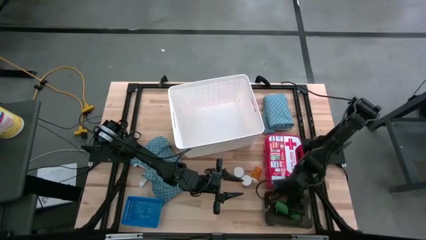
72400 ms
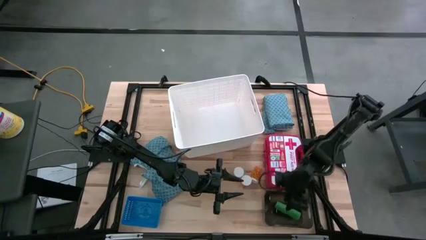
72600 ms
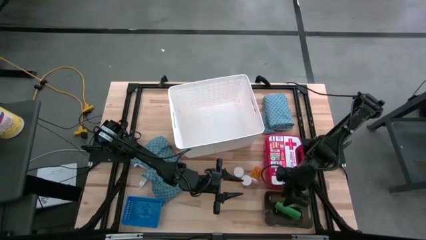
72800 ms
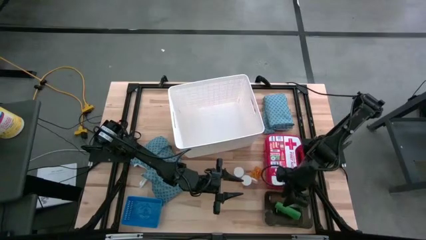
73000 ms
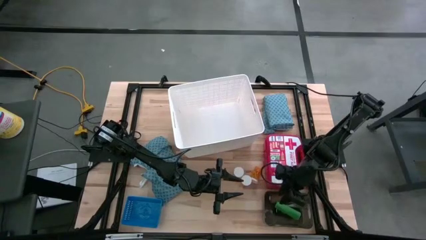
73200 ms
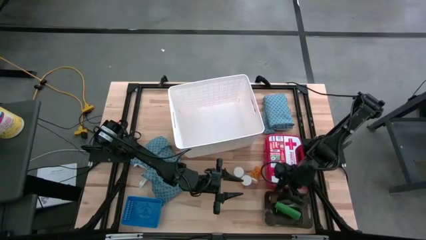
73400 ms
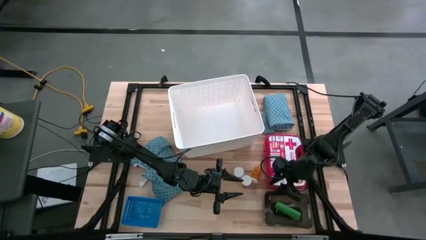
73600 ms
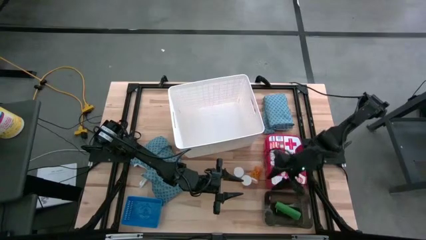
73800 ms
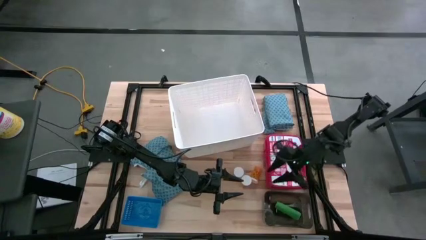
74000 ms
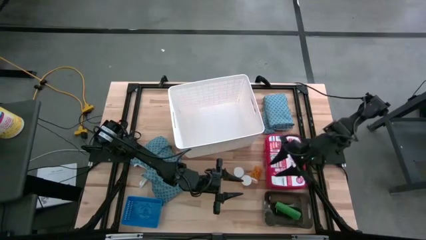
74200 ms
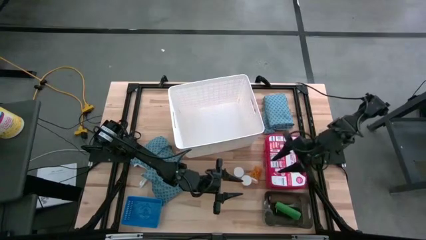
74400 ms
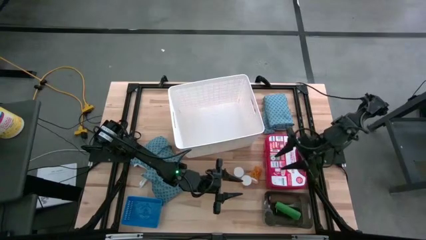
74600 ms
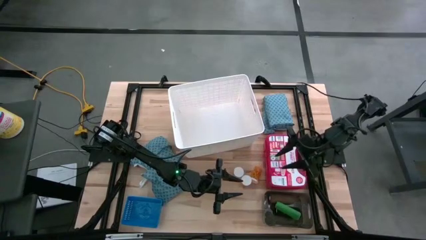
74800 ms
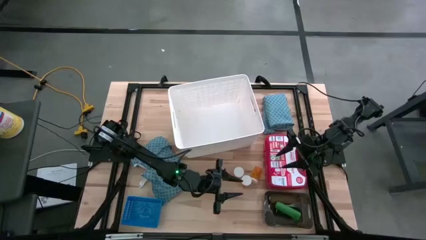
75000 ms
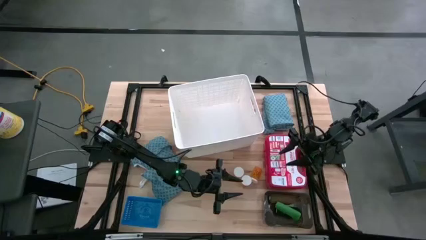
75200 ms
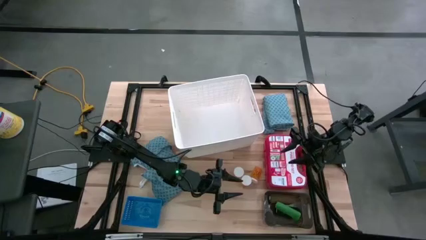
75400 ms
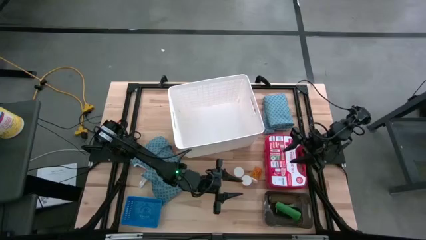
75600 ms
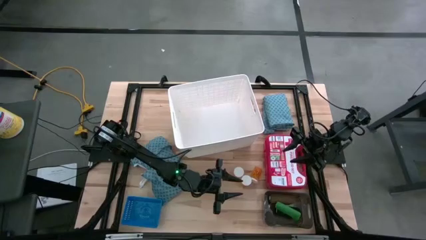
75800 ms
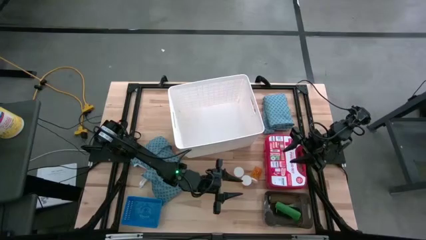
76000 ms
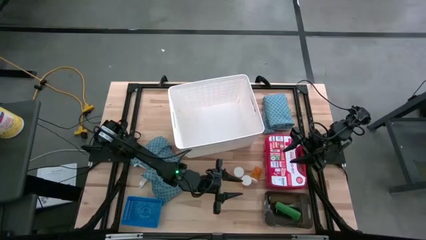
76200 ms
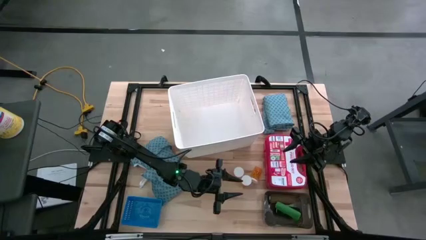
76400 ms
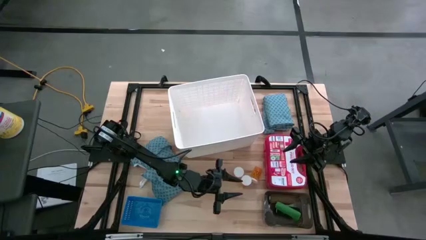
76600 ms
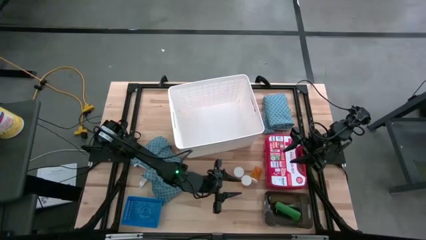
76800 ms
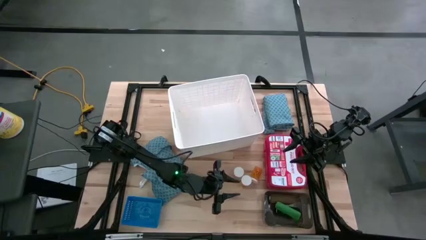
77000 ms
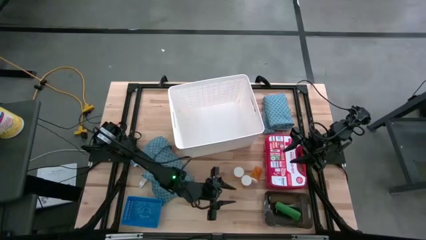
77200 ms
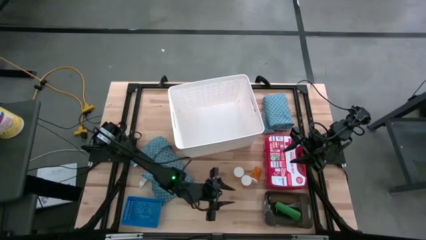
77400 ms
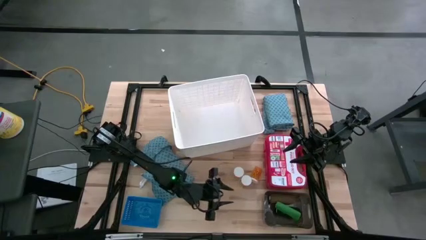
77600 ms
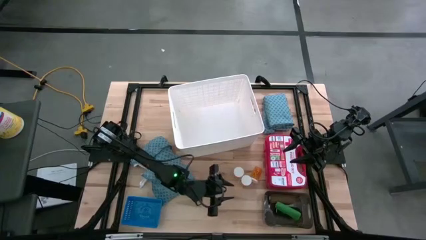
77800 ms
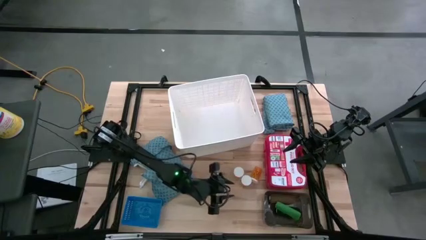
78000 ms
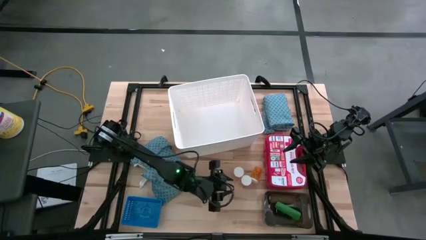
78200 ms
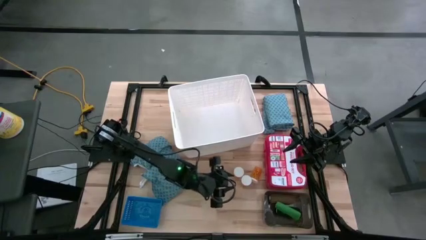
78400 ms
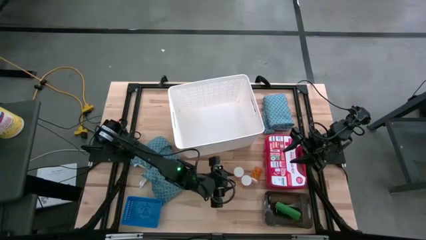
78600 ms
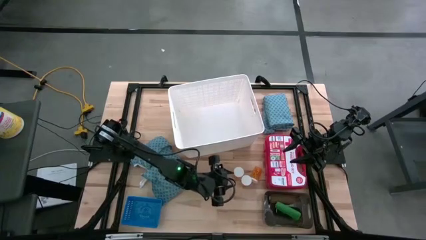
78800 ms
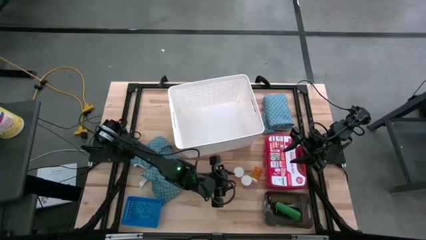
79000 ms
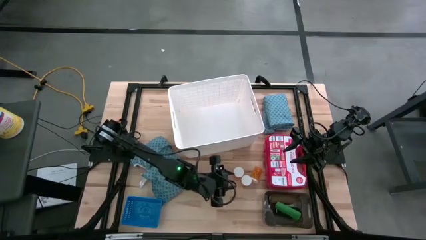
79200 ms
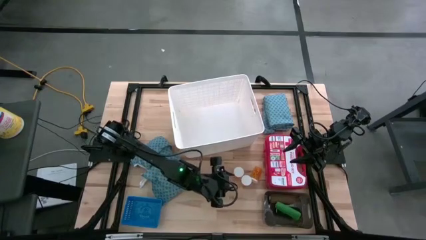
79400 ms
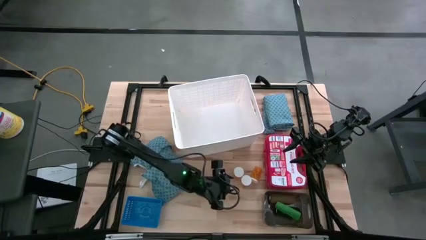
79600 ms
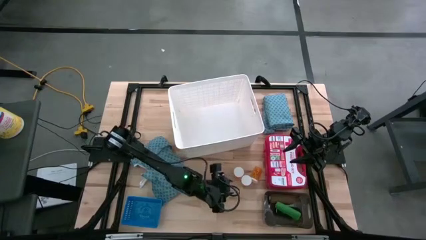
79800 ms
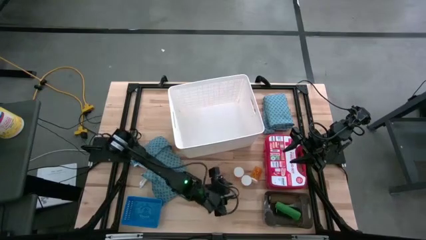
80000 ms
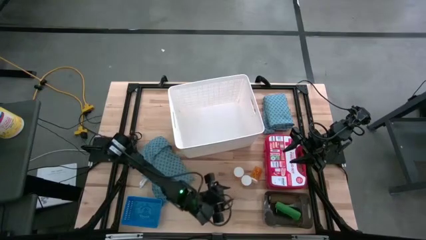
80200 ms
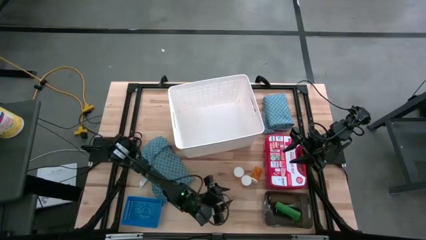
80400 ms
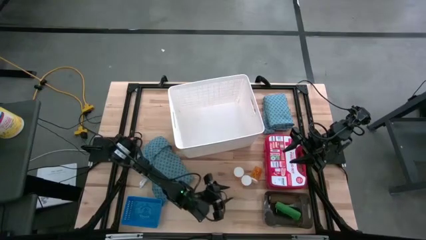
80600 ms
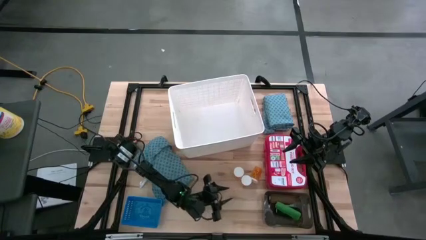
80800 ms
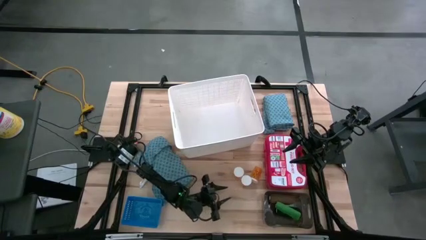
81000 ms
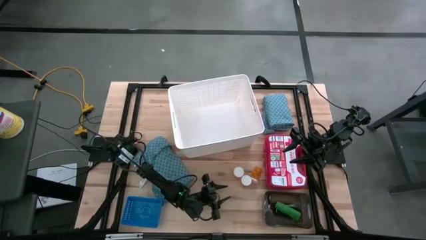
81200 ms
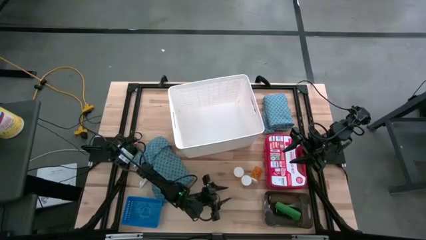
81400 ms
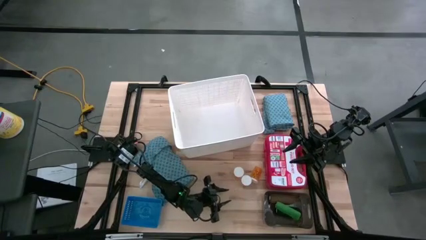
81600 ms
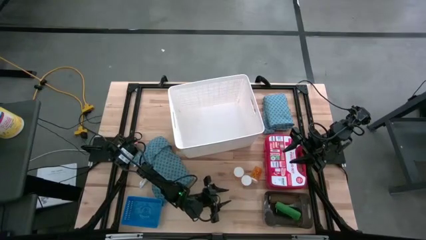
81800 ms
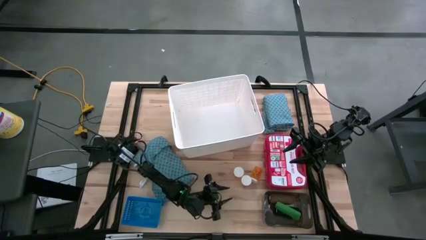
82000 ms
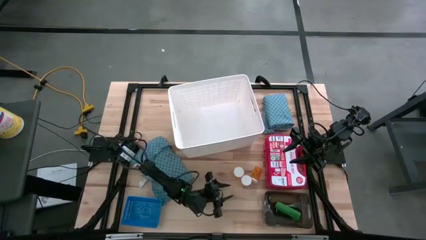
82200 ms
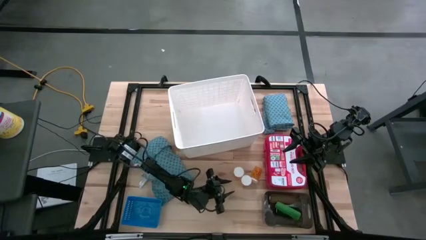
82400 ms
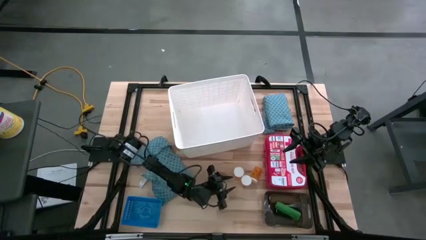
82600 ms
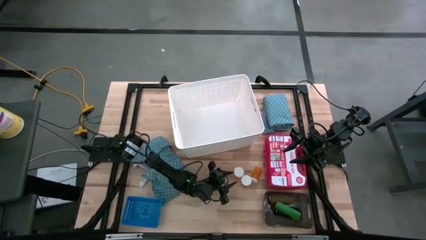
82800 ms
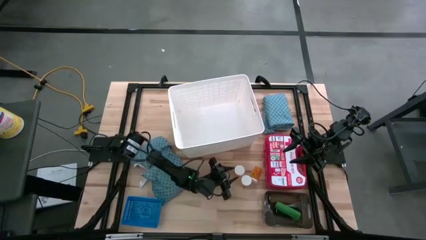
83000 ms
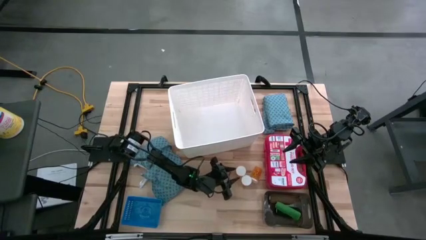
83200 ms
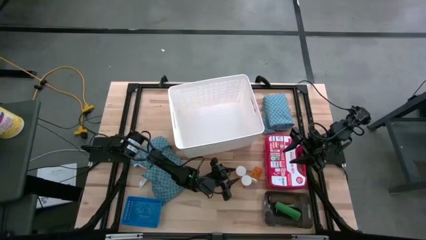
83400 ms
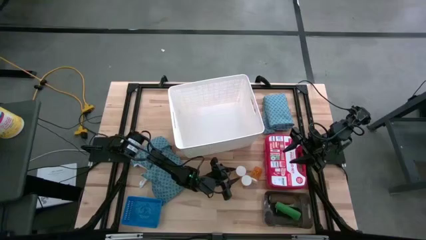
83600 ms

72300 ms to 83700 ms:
Task: Pick & place medical supplies in basket/bin
Put the left orange pill bottle into the blue bin

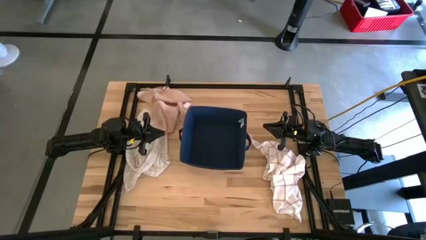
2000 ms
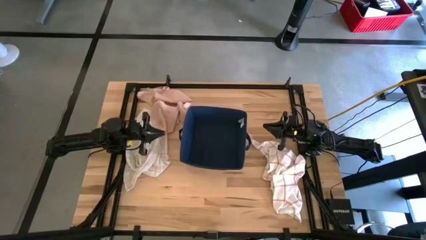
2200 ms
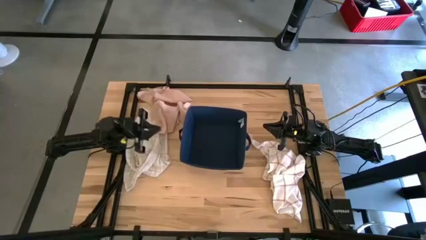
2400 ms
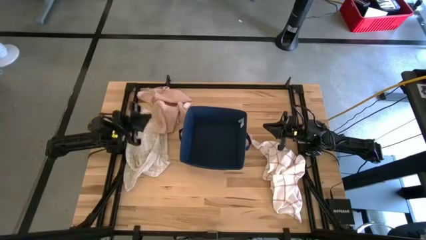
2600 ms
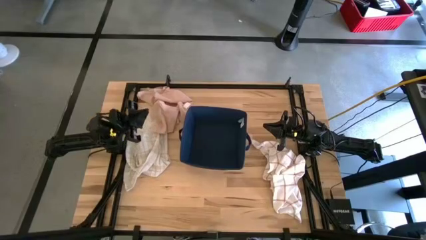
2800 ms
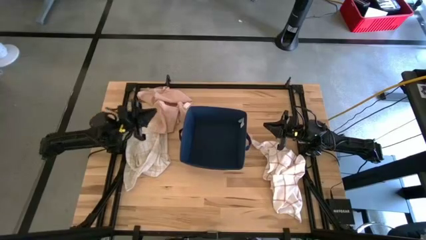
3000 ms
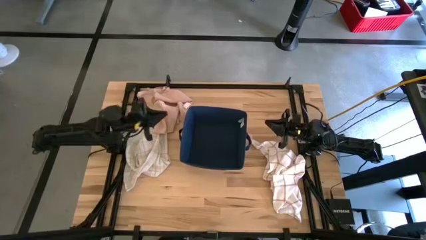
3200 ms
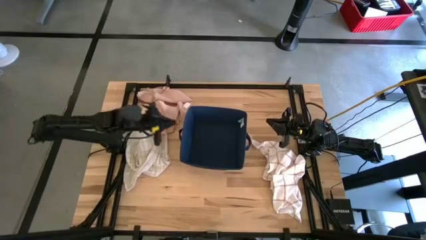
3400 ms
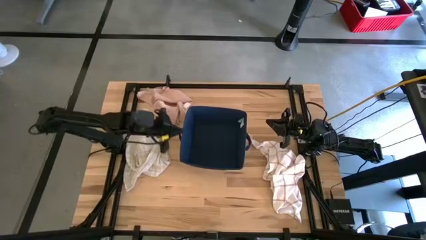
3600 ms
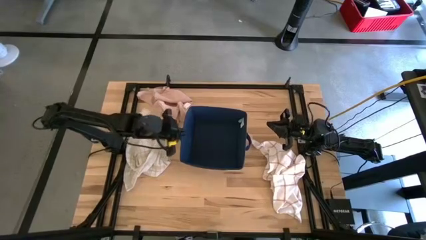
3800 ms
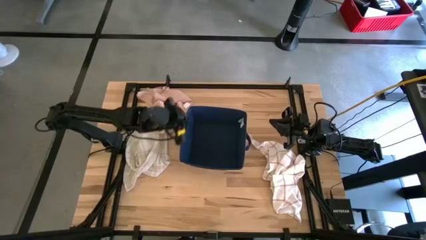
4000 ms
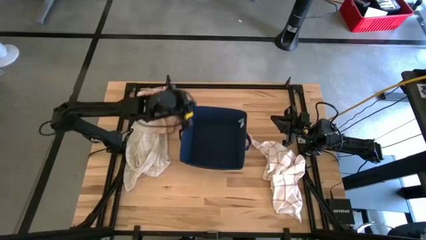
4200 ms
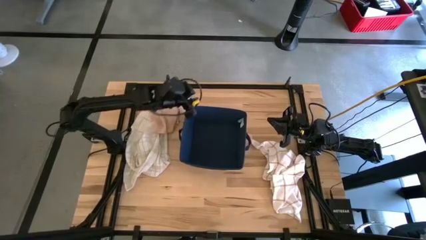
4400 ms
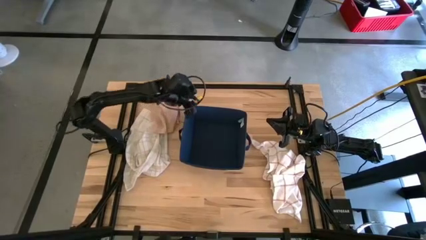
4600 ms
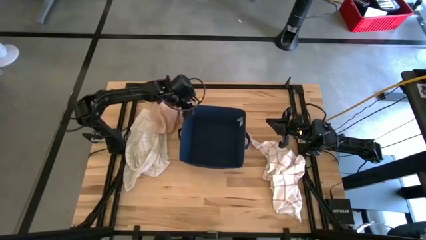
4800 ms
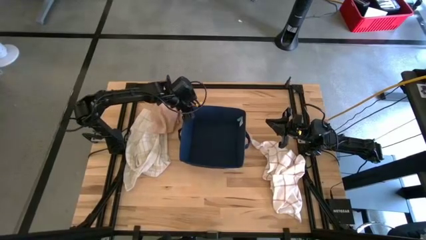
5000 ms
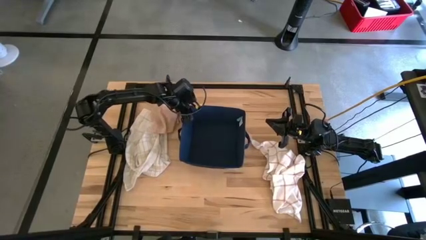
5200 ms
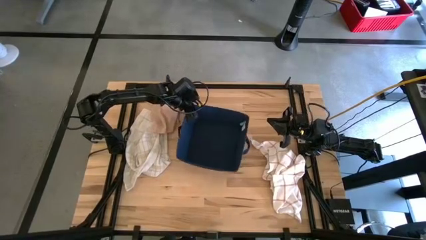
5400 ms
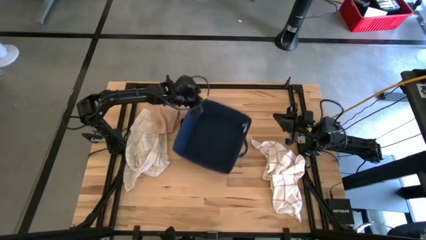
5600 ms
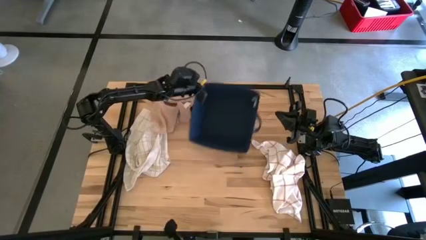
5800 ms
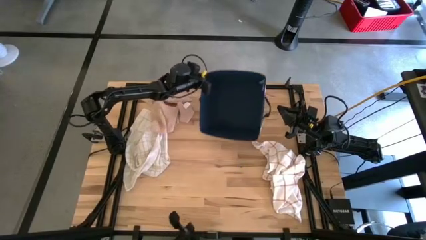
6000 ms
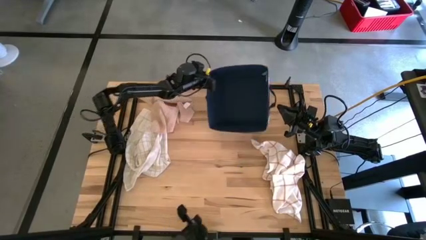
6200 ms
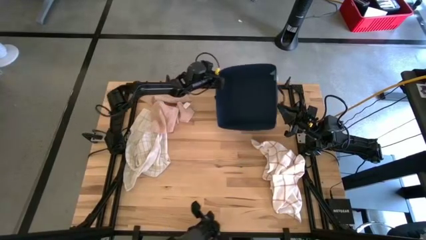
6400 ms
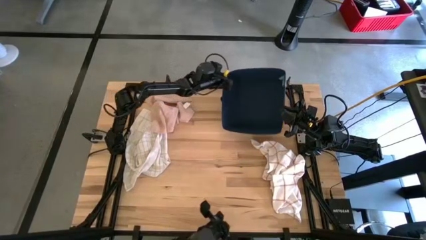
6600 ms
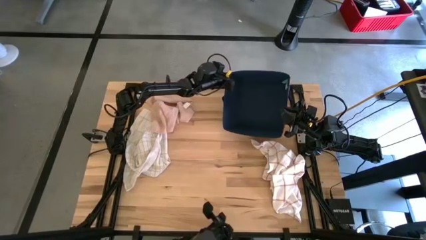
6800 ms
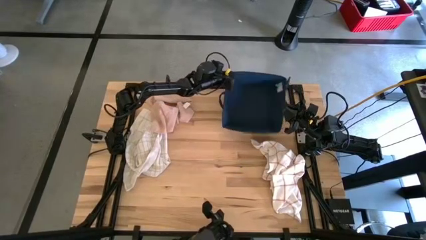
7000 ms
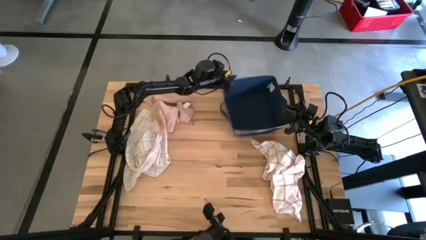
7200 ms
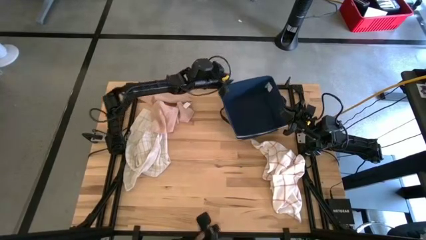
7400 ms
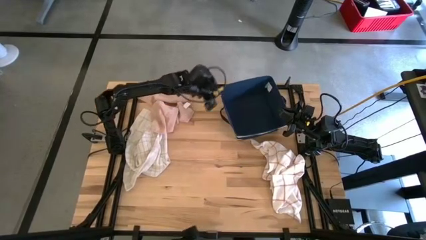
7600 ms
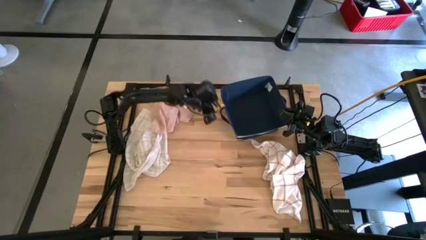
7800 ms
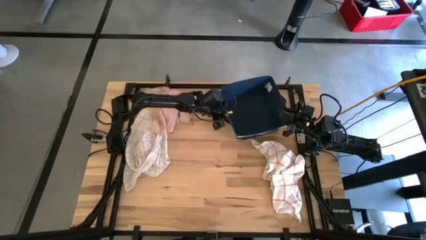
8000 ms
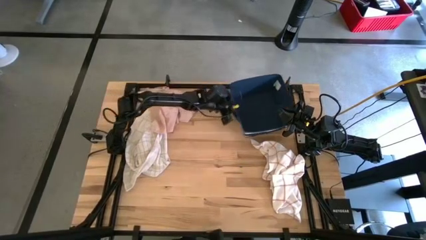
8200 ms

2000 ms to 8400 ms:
Task: Fold towel
Move the blue laundry bin to the top right
